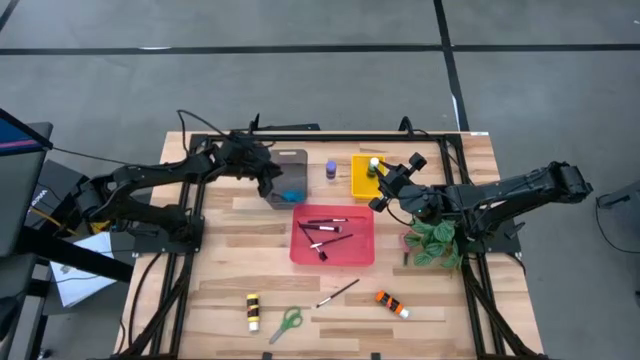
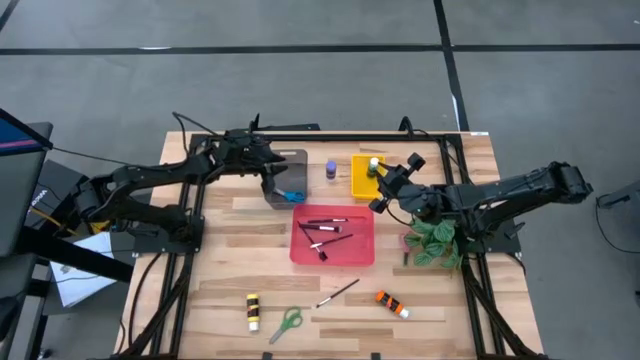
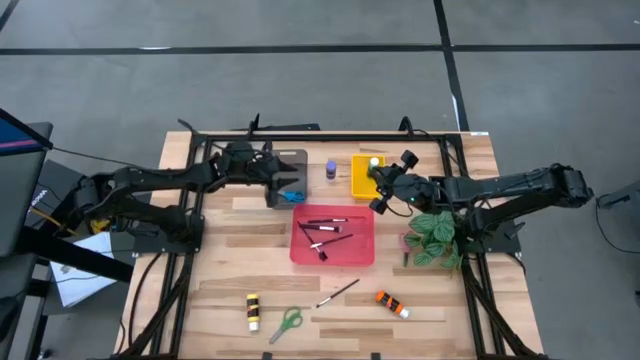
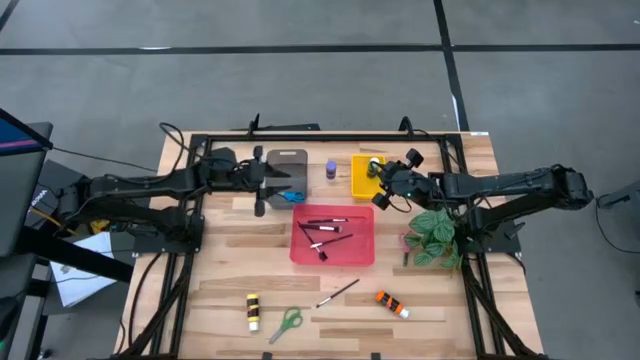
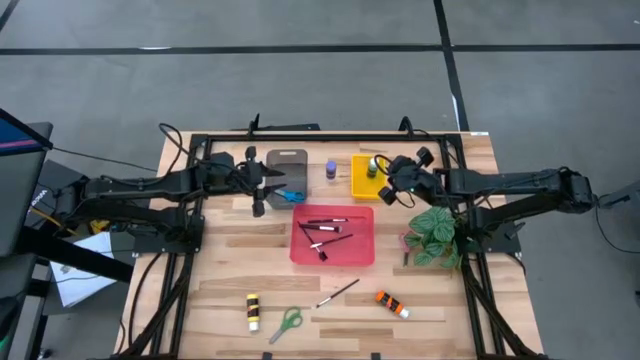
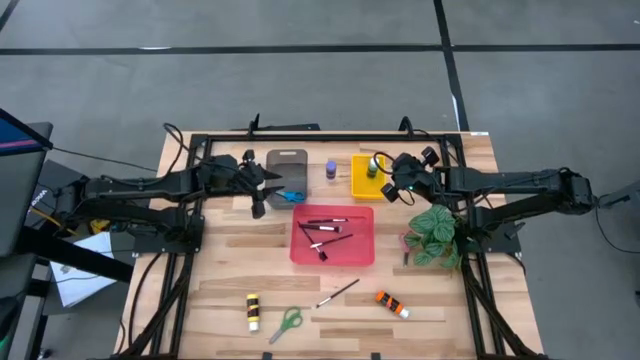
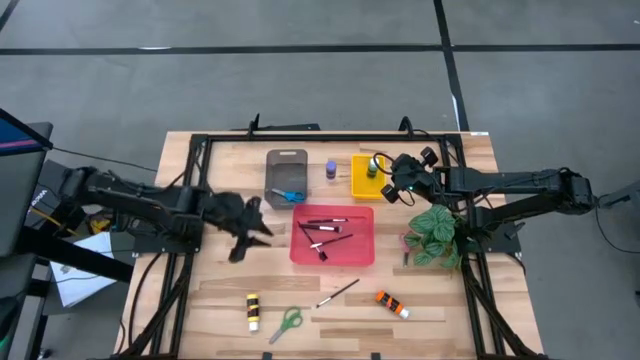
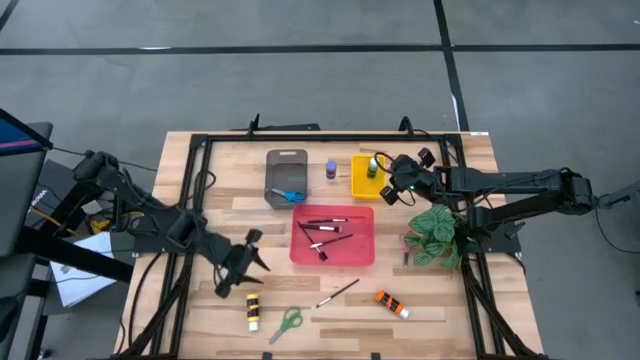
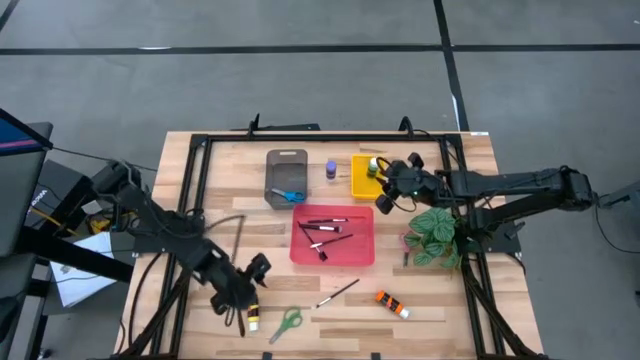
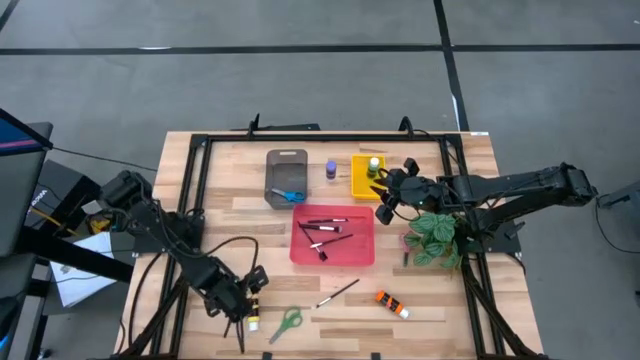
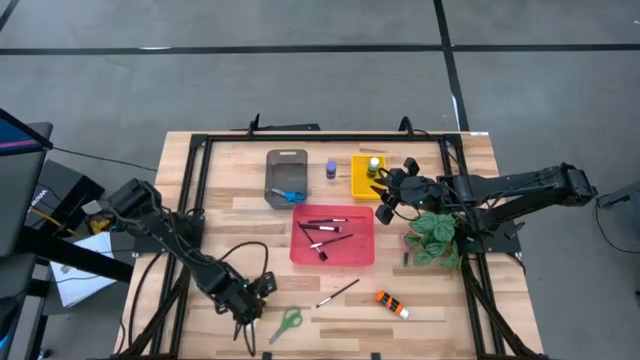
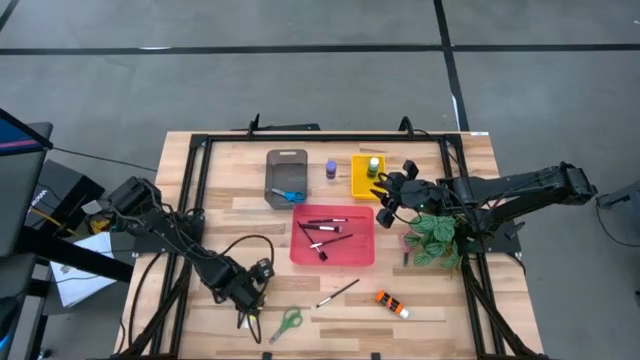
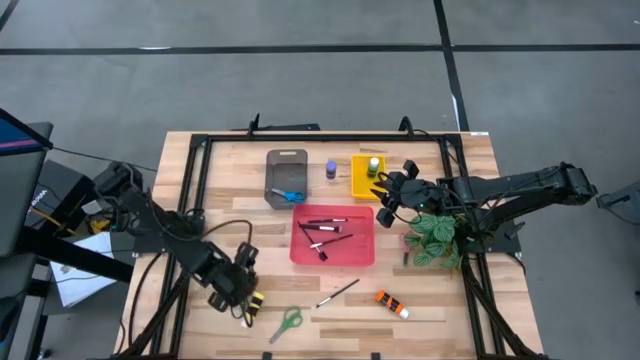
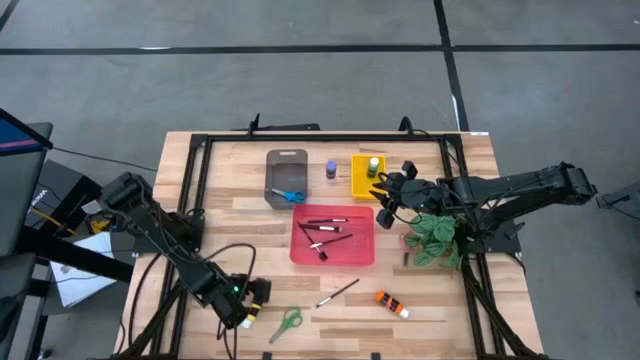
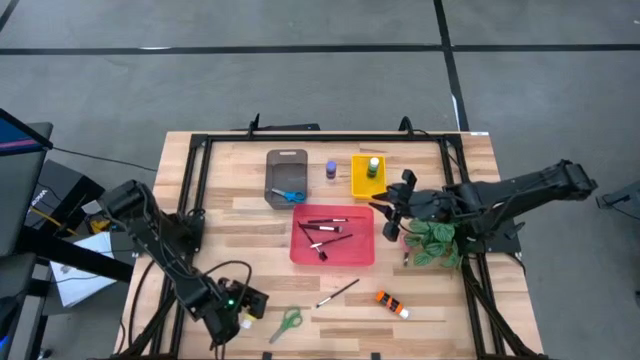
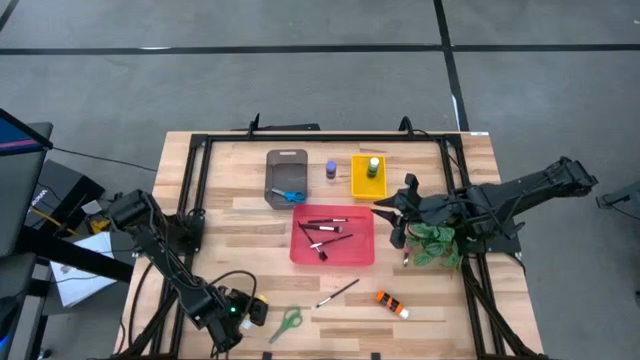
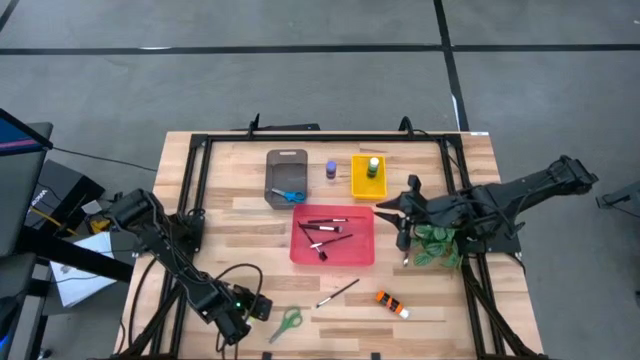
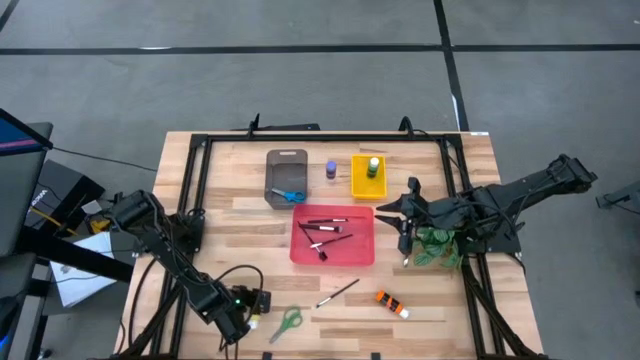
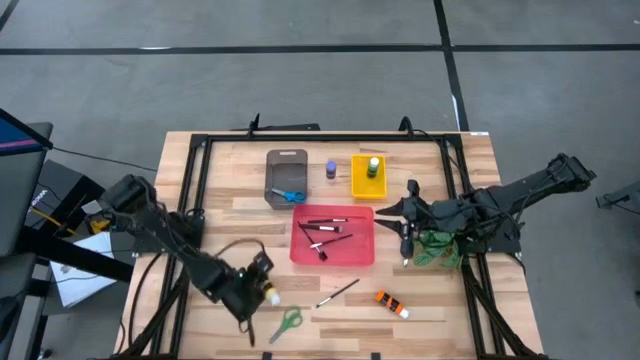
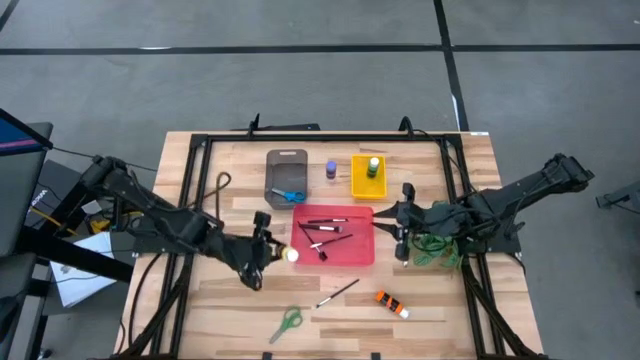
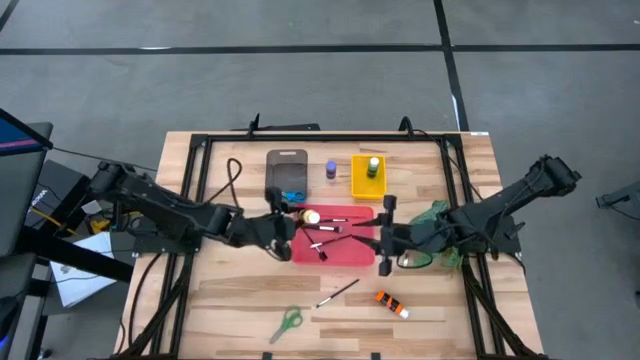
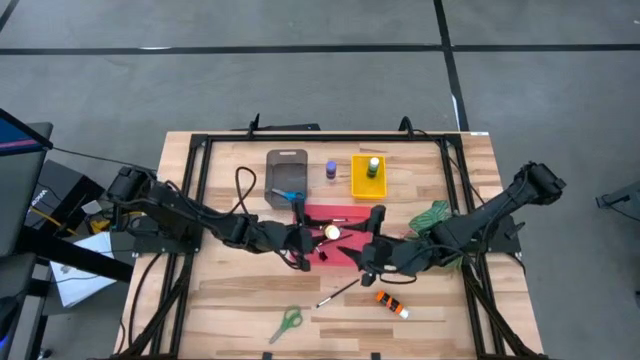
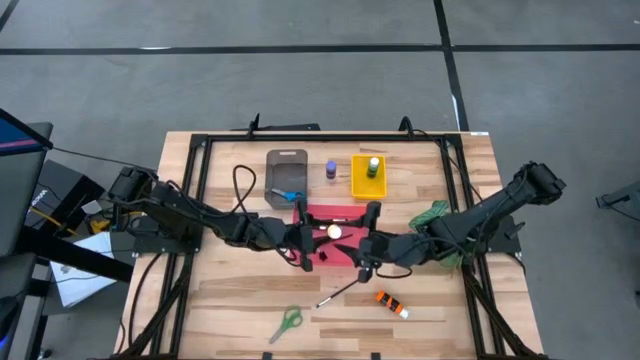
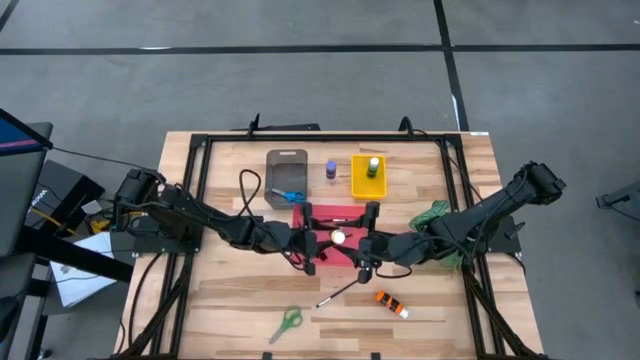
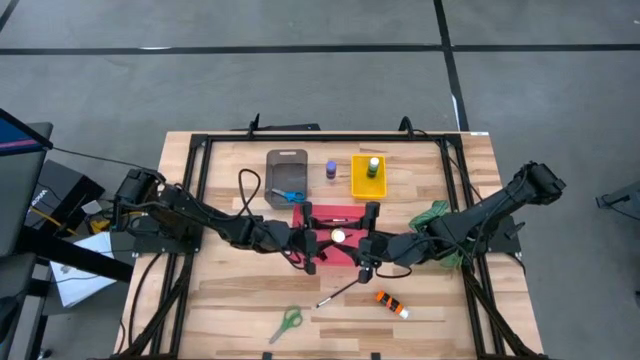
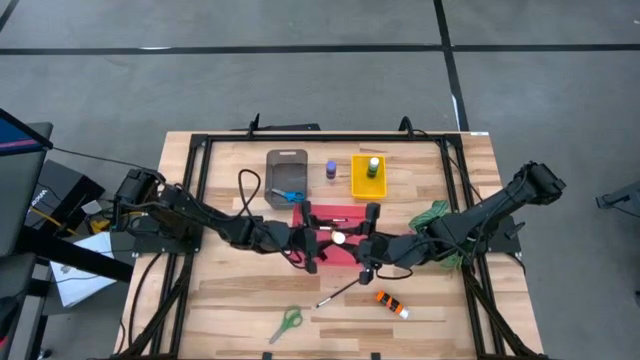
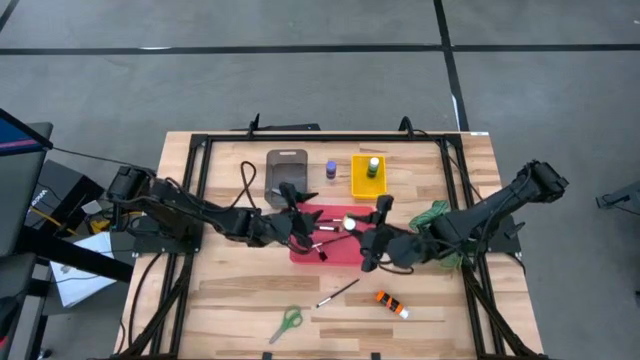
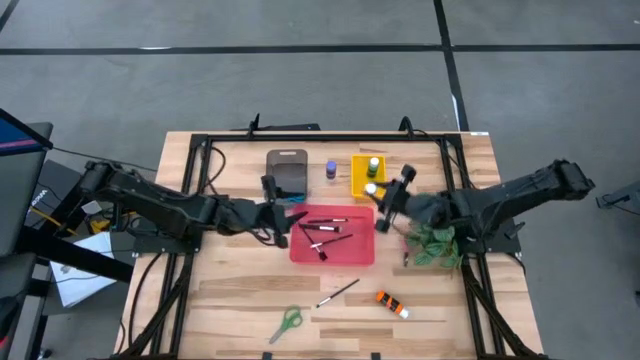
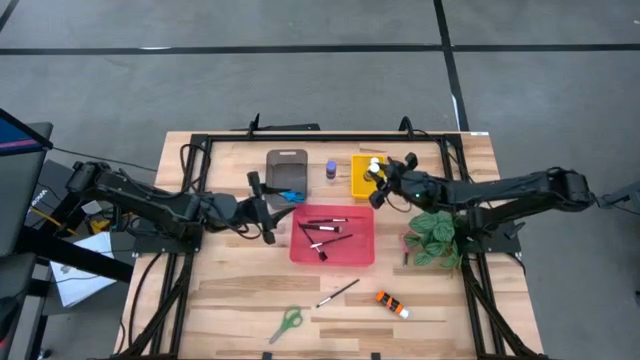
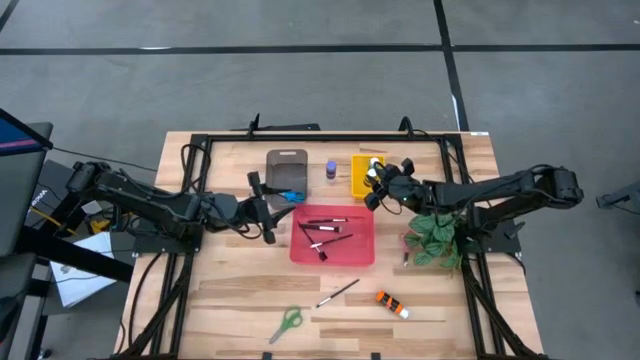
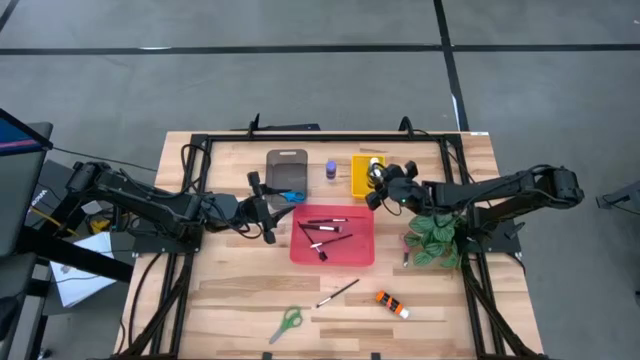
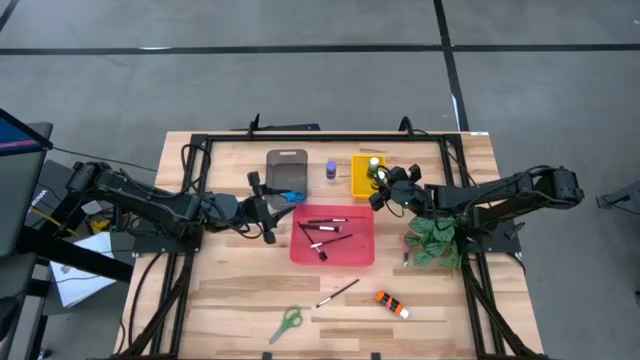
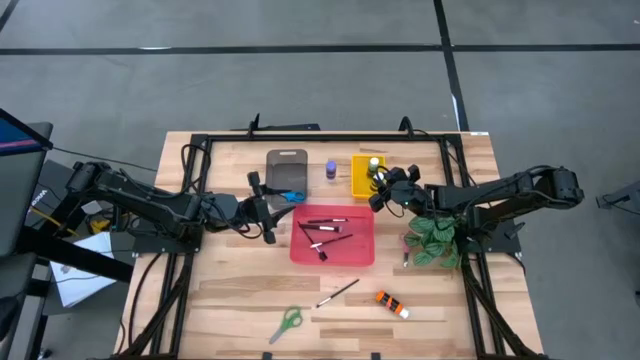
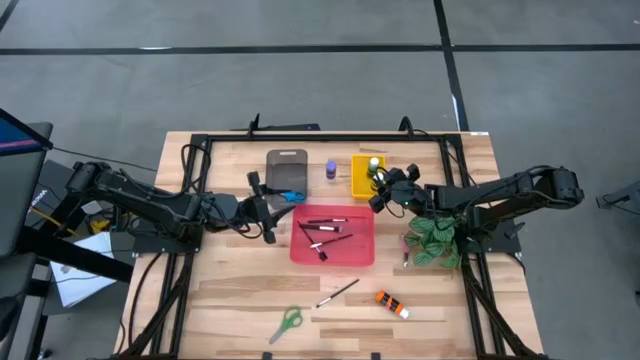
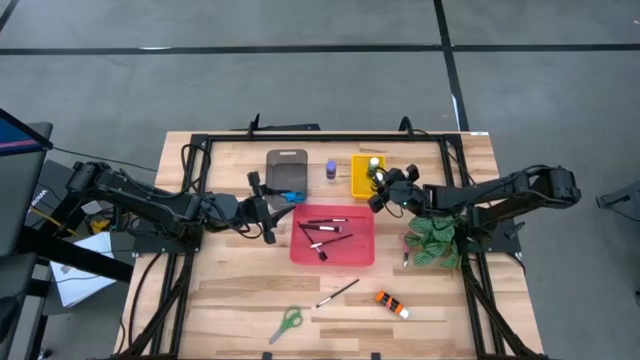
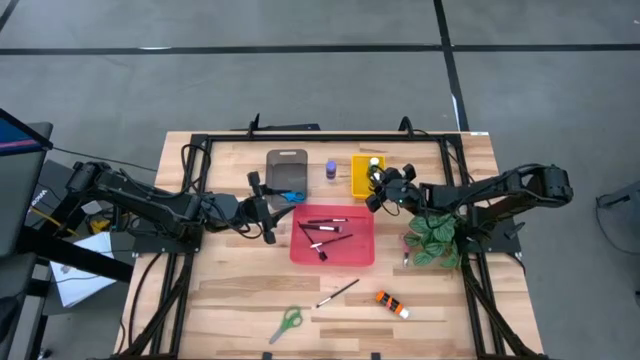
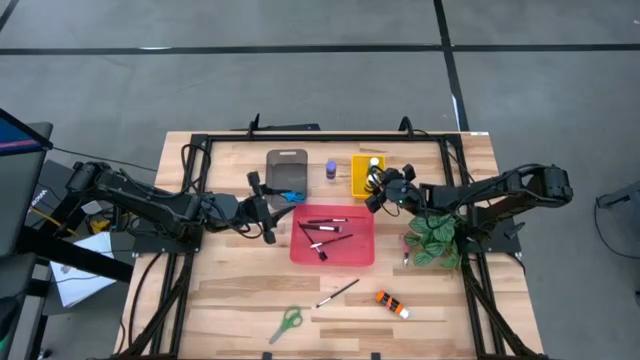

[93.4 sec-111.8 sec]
Task: Pick & Place Paint Supplies
Put the yellow paint bottle into the yellow bin

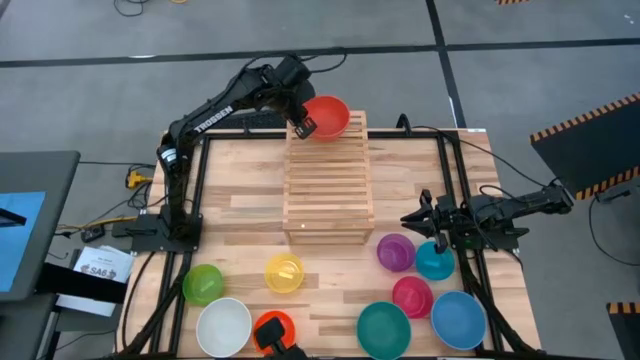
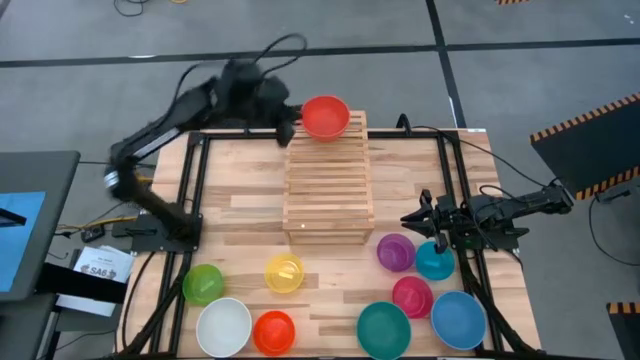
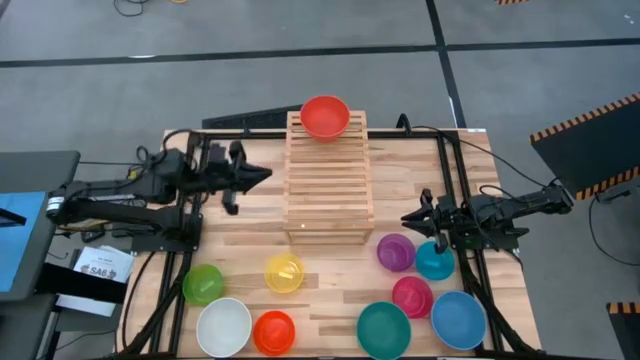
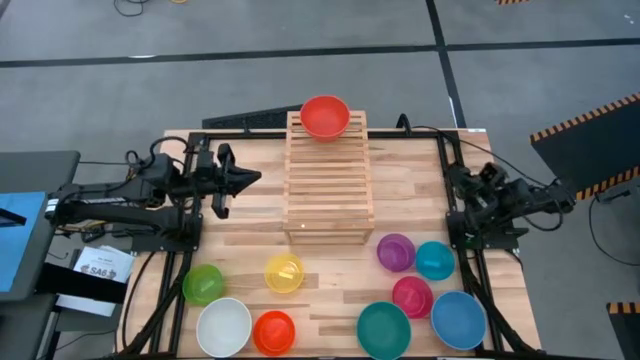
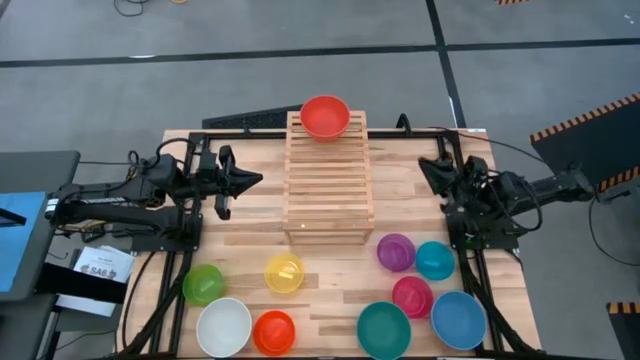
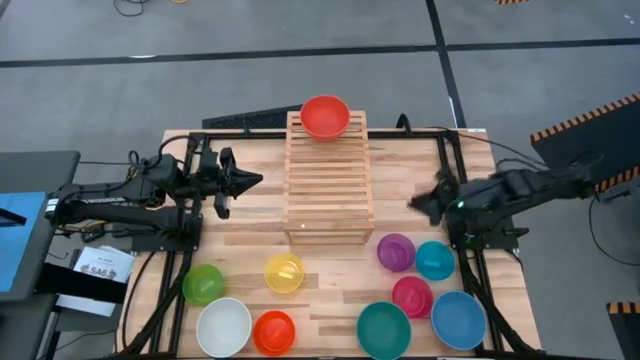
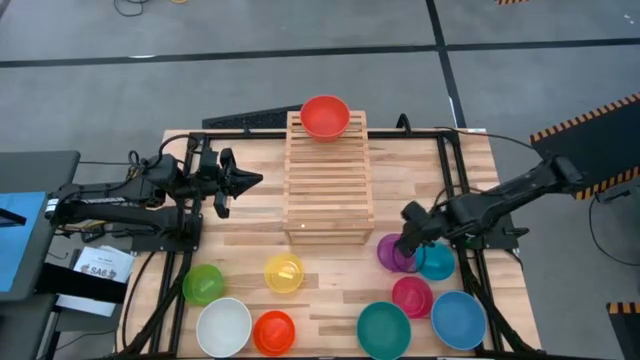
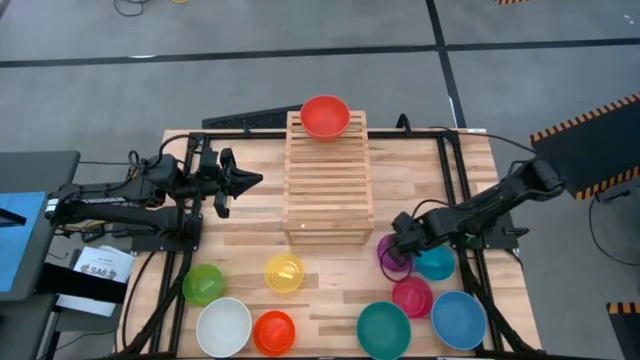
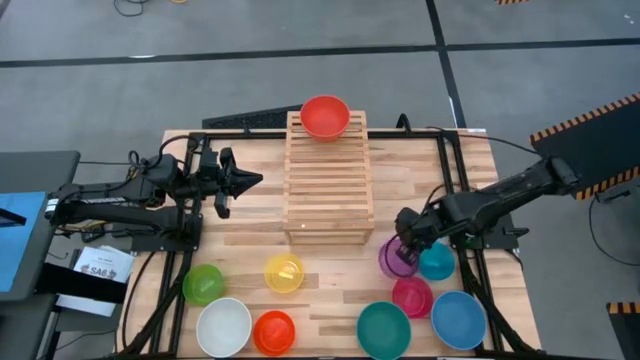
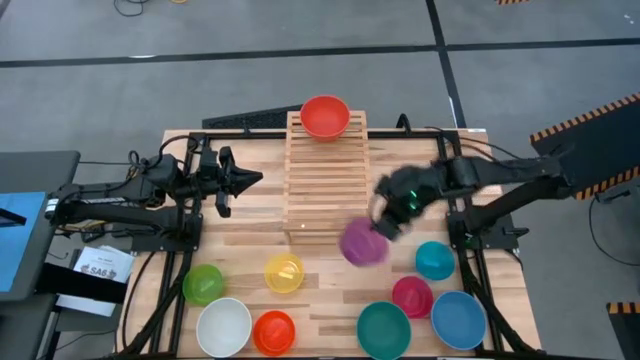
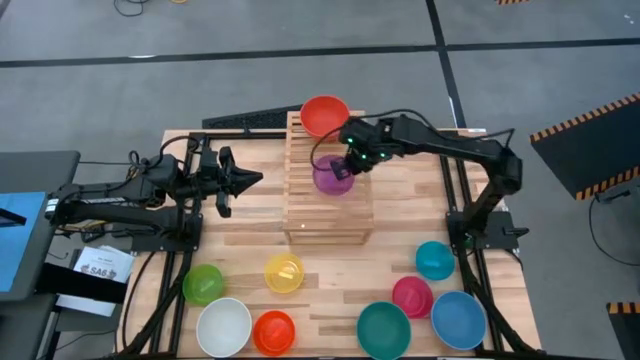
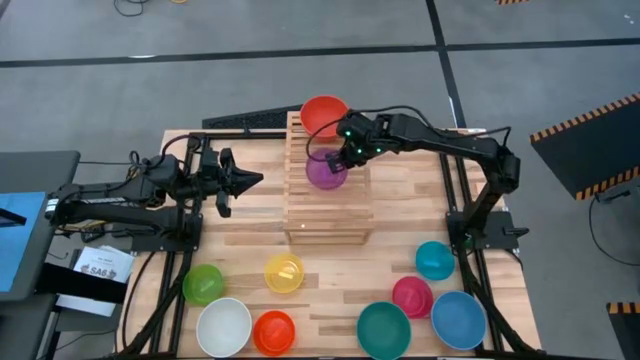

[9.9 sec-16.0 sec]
Task: Place and stack bowls onto a shelf
Put the small purple bowl on the shelf
